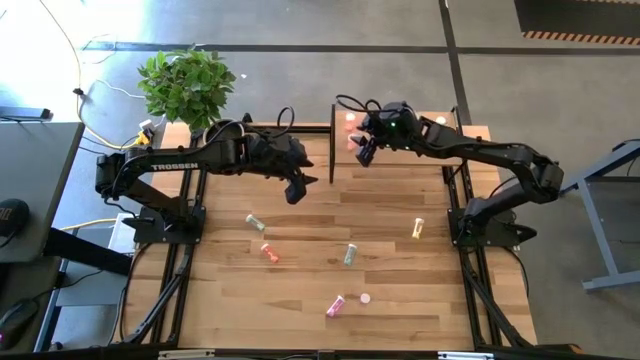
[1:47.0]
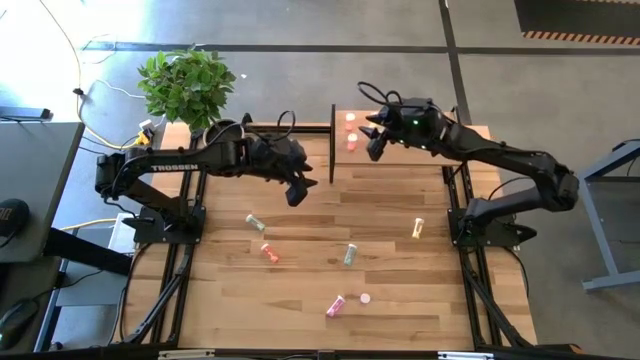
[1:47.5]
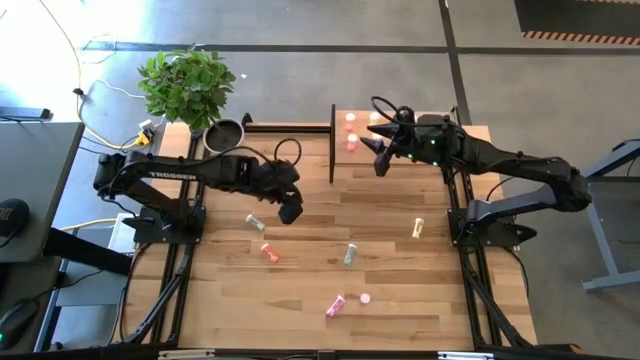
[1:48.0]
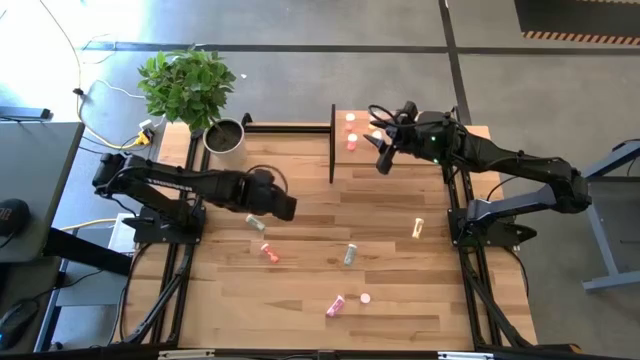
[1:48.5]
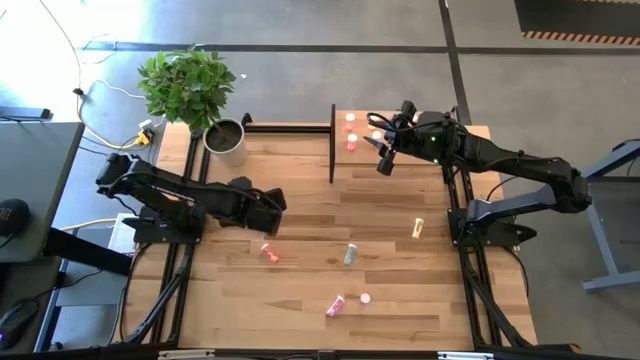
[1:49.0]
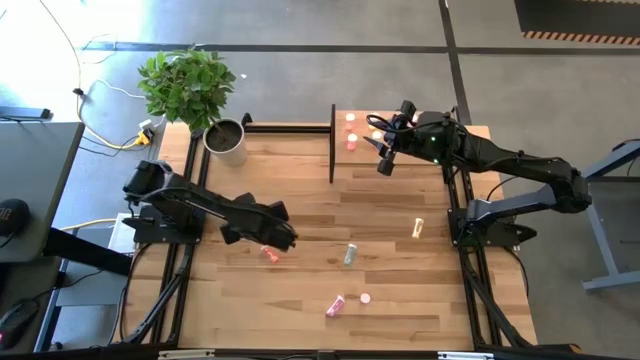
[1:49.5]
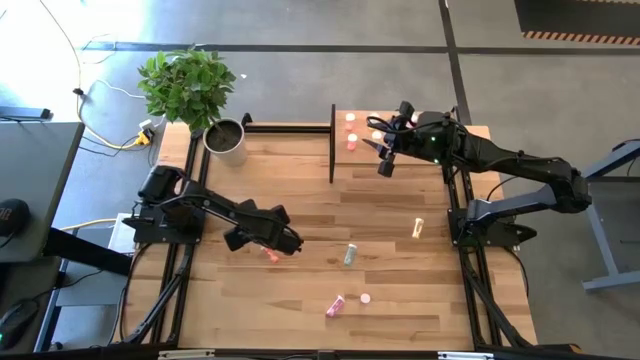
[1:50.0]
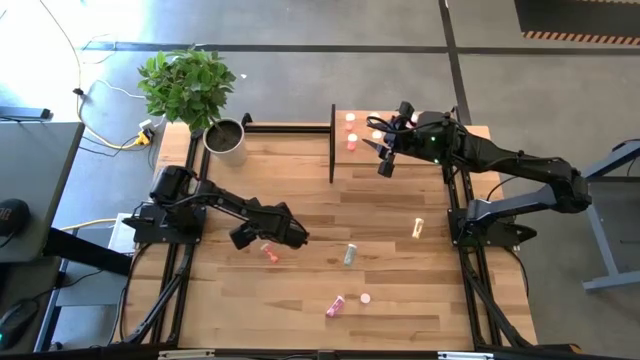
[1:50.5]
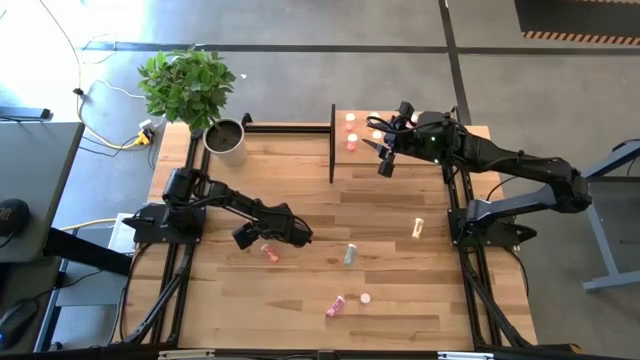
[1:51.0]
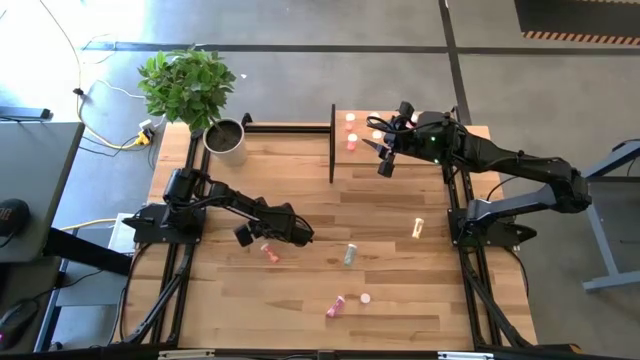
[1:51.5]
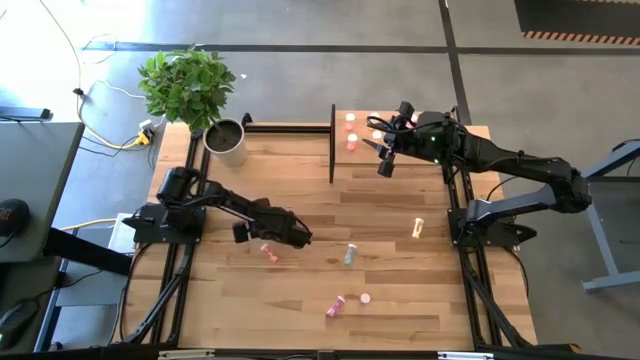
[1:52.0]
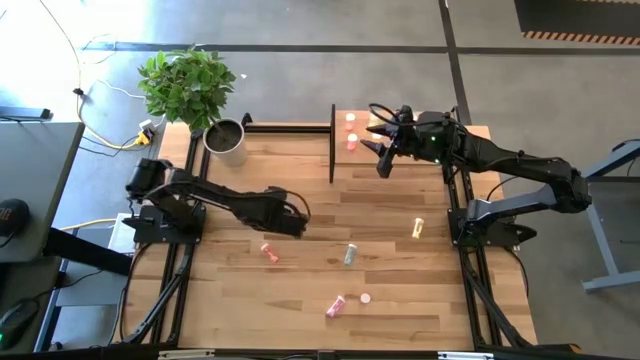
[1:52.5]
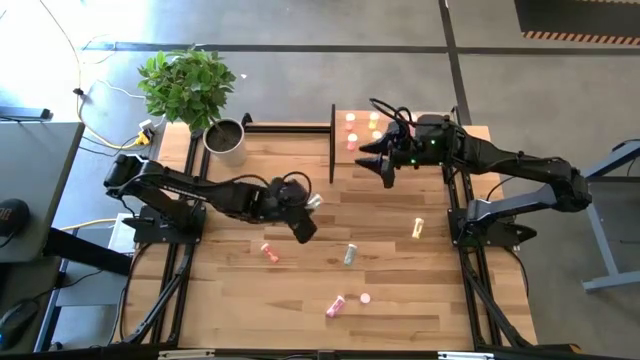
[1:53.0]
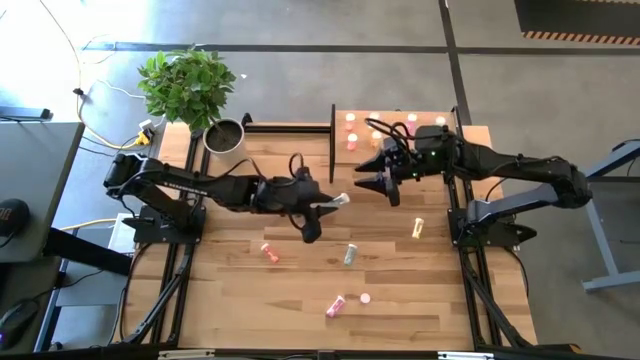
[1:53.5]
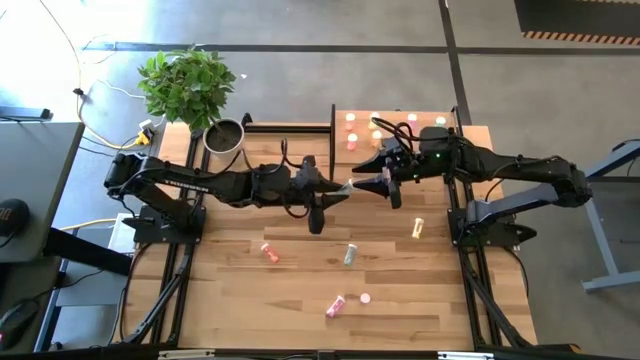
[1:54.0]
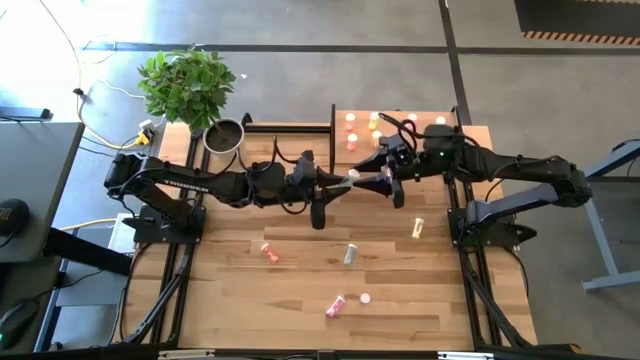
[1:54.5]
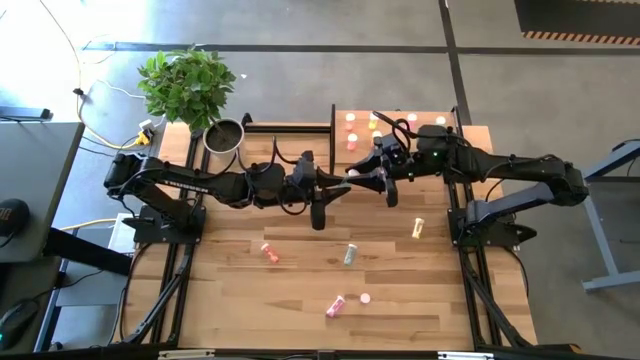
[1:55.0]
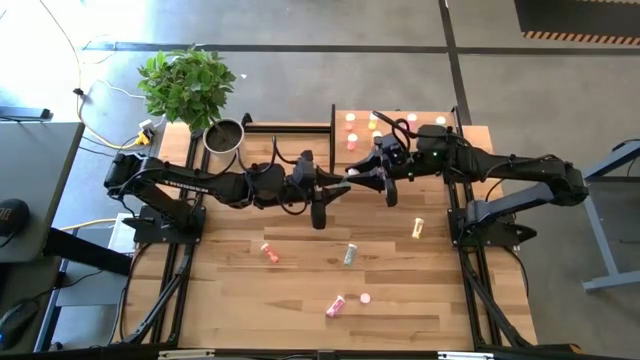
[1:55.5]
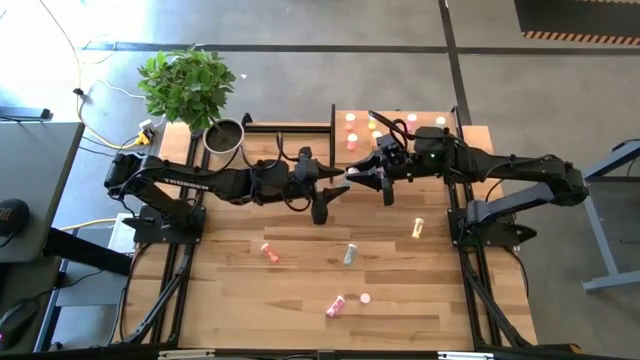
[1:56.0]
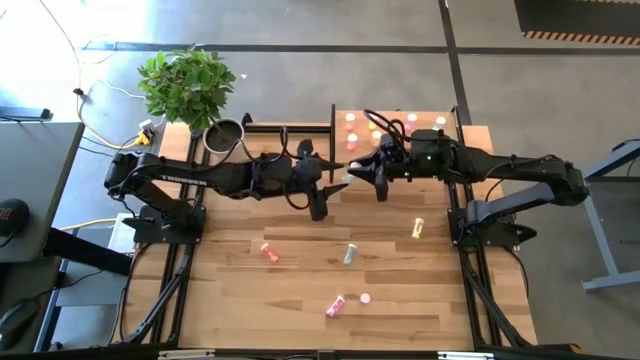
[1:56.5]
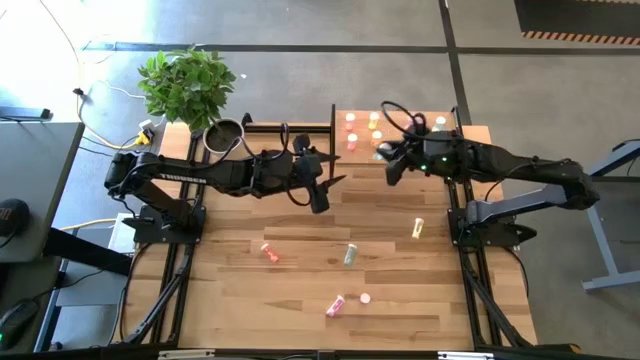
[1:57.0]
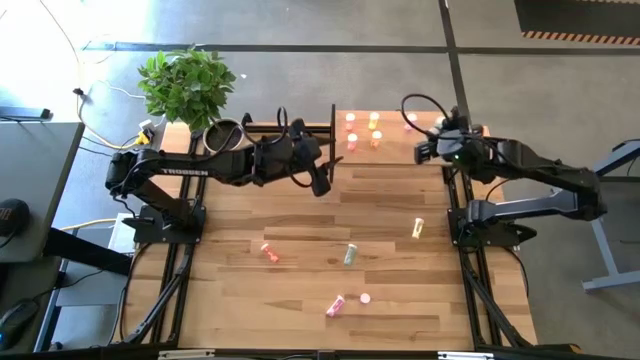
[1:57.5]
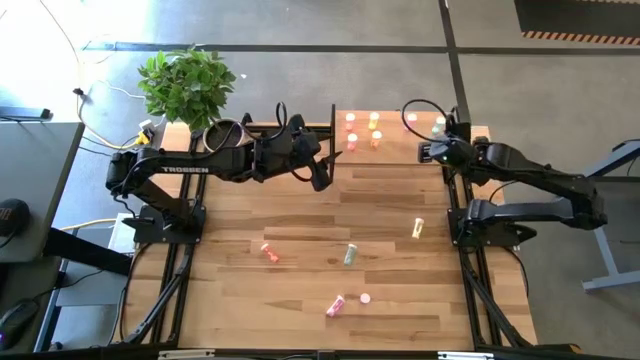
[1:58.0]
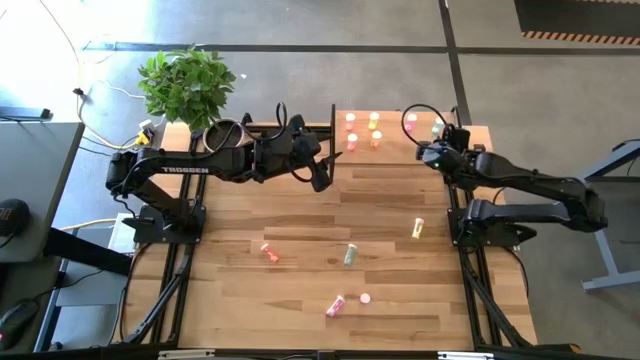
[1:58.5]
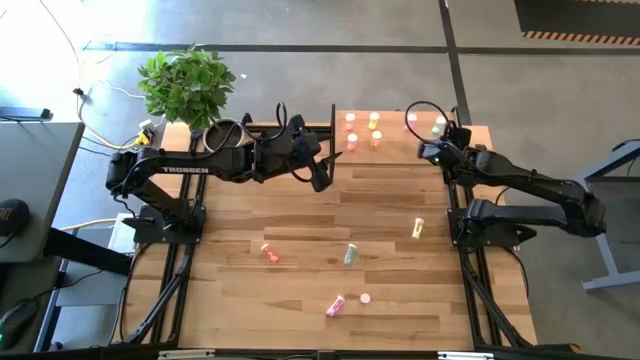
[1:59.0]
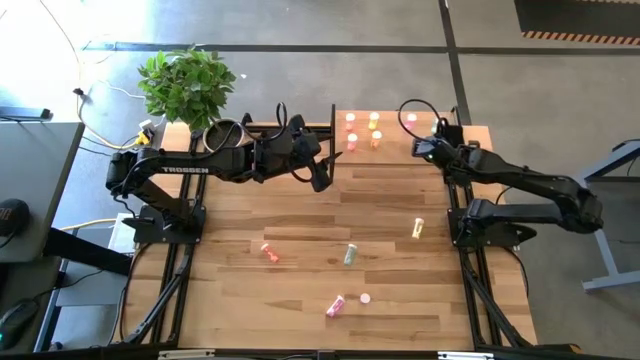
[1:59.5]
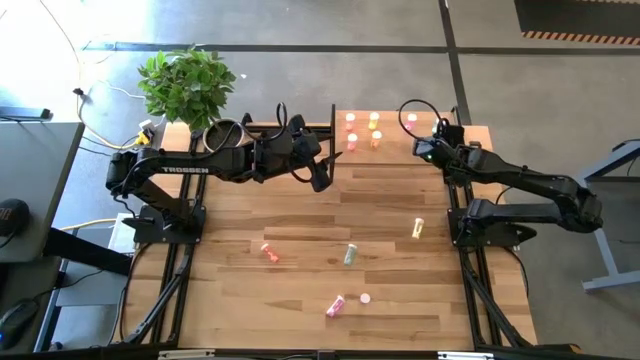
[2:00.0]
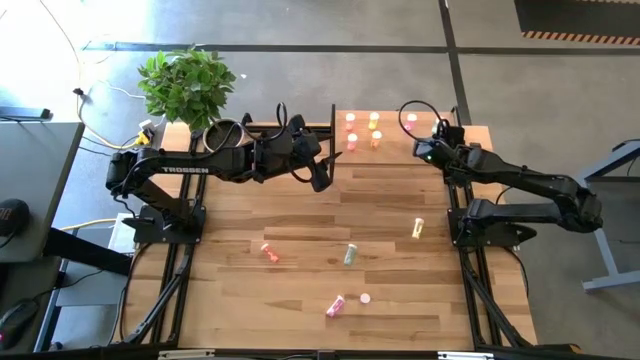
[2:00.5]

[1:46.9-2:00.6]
Task: Pick and place medicine bottles onto shelf by color
Put the top blue medicine bottle aligned with the other blue medicine bottle on the shelf

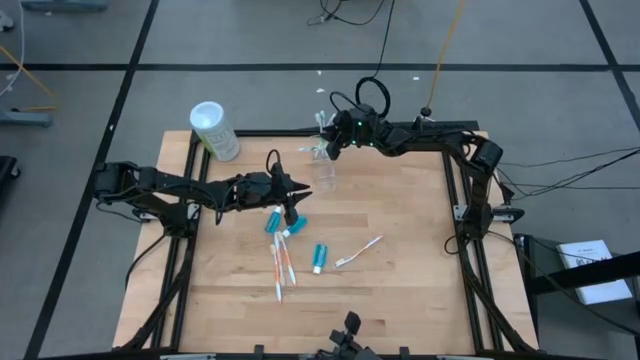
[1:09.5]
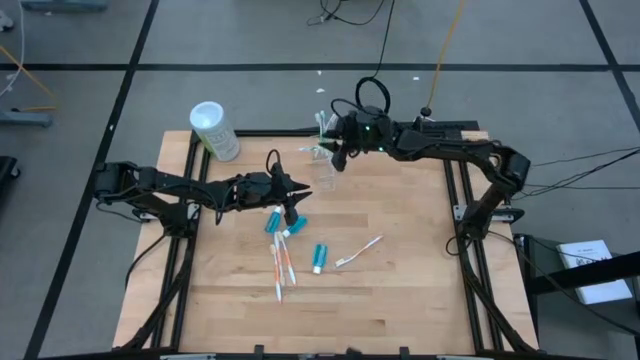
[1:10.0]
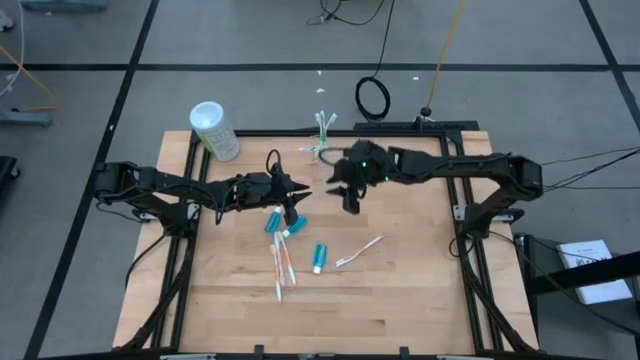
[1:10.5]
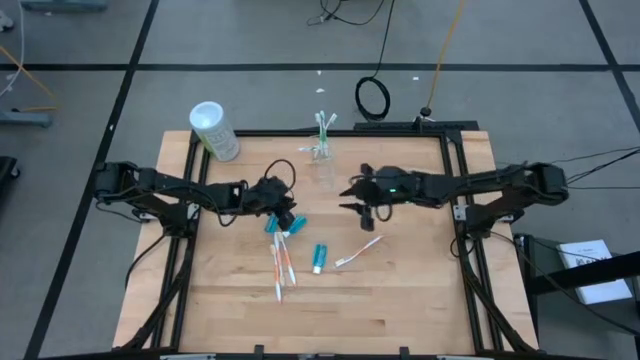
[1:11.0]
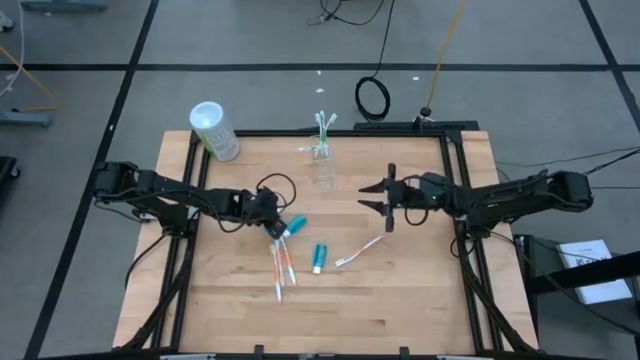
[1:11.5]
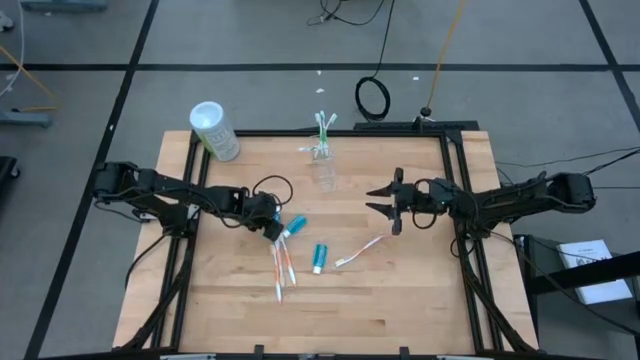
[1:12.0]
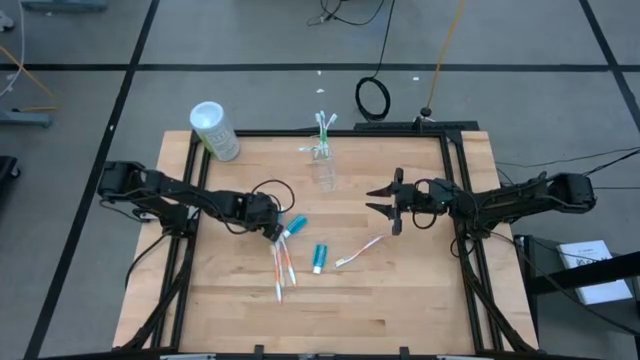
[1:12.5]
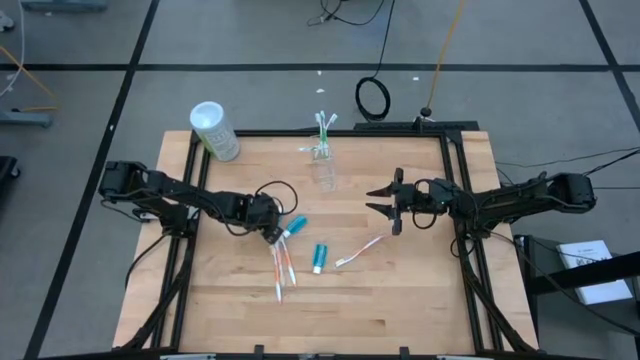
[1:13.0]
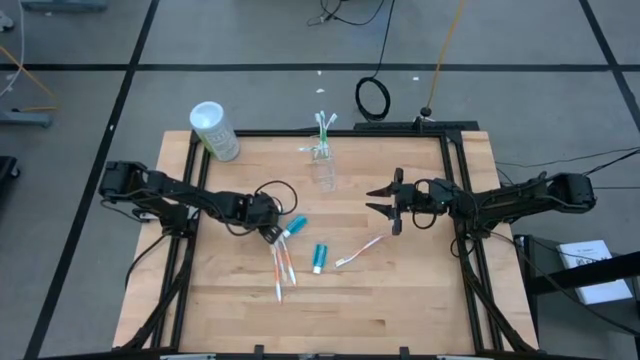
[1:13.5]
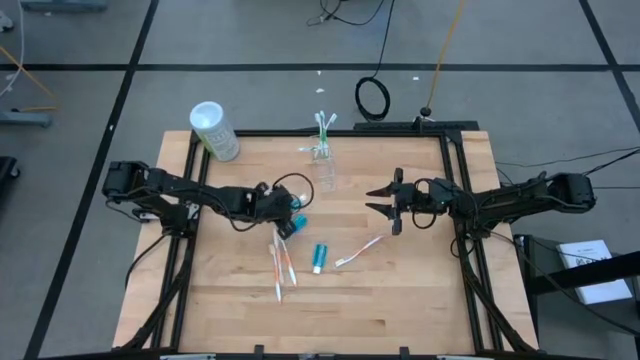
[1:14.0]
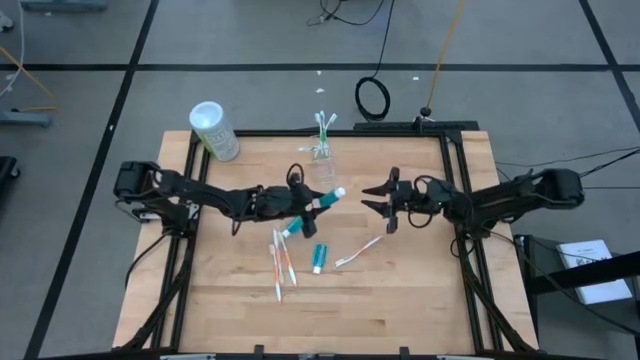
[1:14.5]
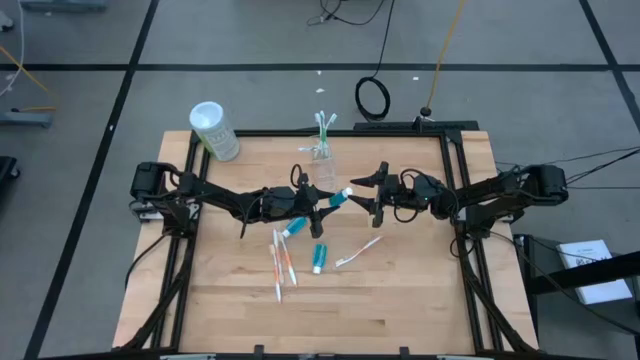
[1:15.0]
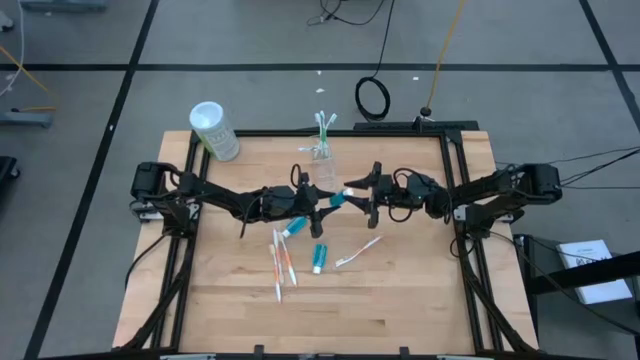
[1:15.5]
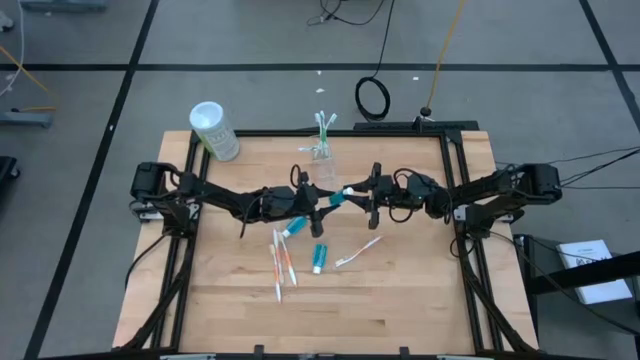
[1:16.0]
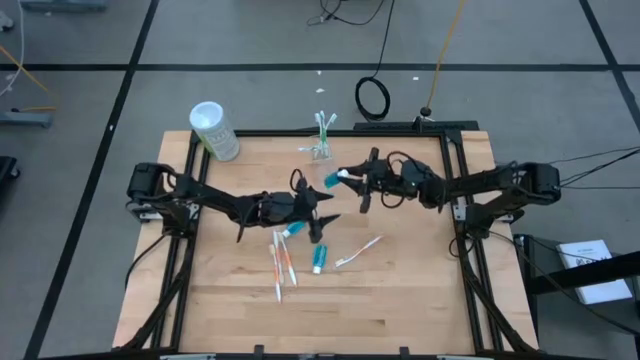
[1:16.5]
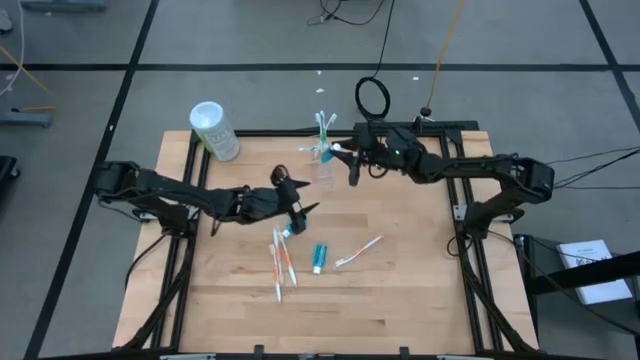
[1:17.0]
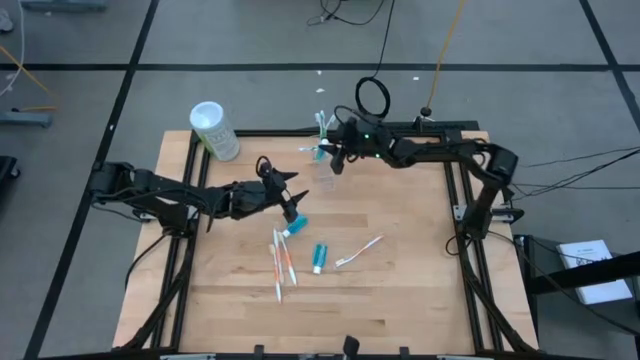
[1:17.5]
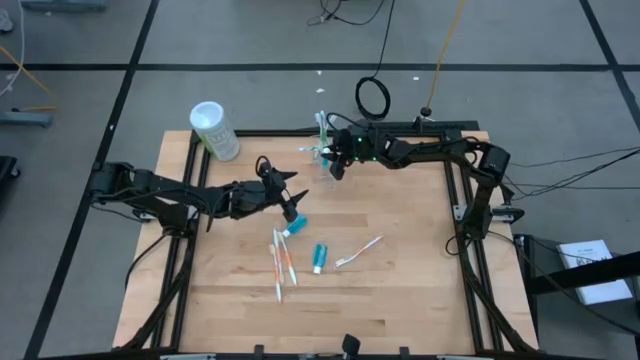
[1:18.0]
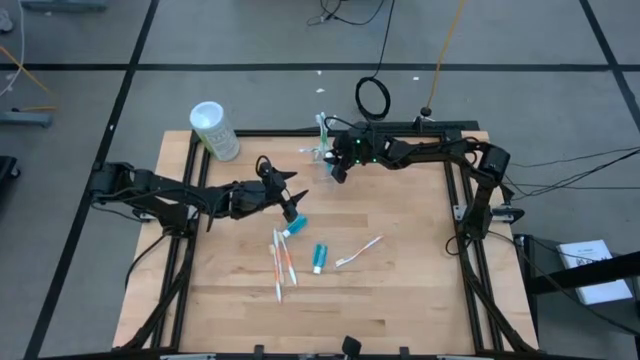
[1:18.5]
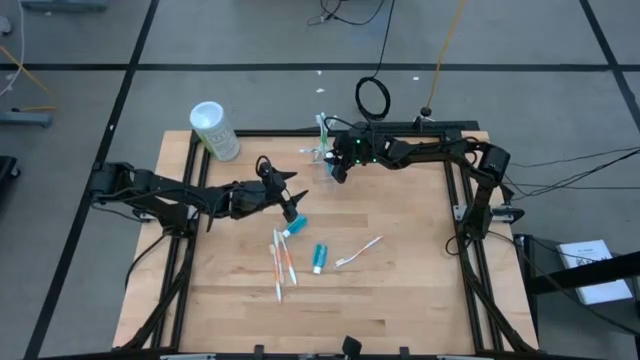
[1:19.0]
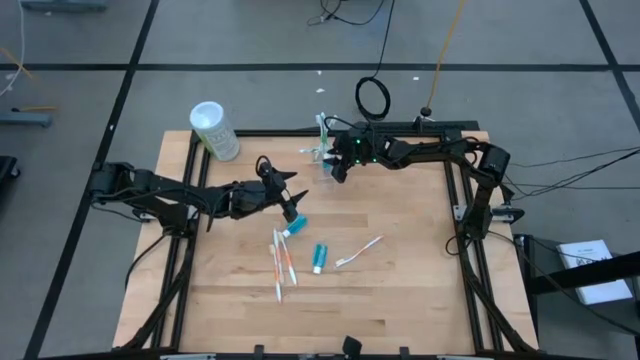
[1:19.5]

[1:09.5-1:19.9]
Task: Pick & Place toothbrushing station
Put the blue mouthwash bottle into the transparent organizer
